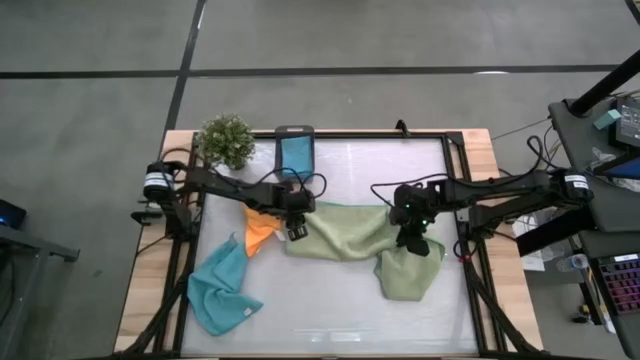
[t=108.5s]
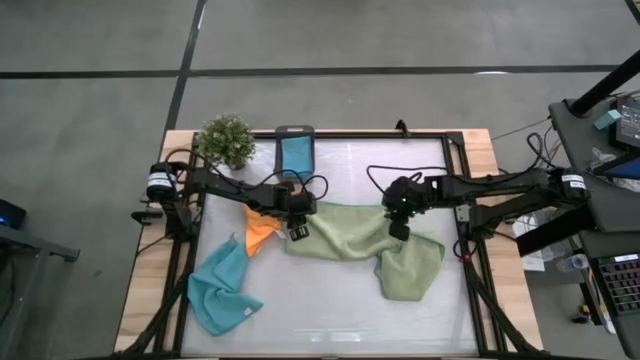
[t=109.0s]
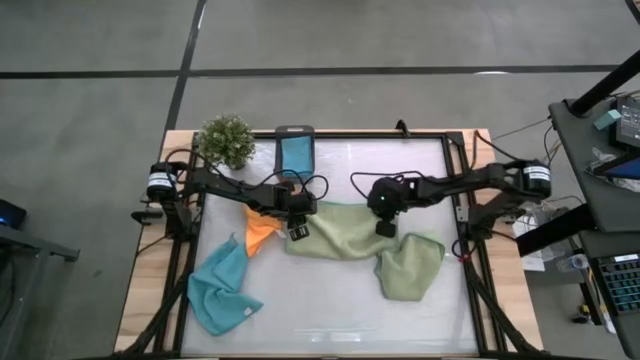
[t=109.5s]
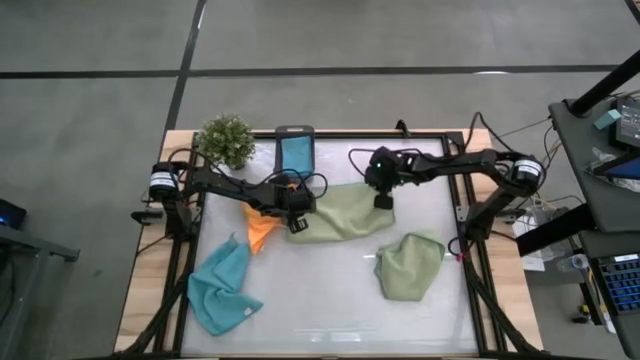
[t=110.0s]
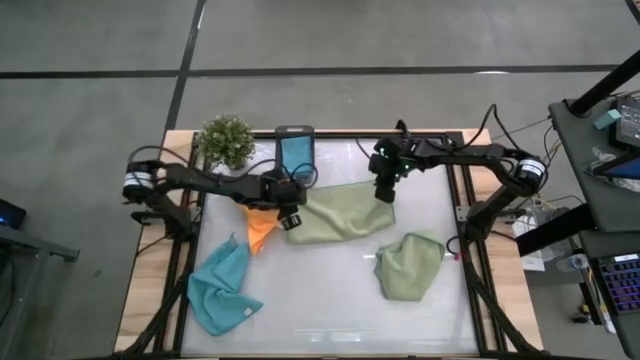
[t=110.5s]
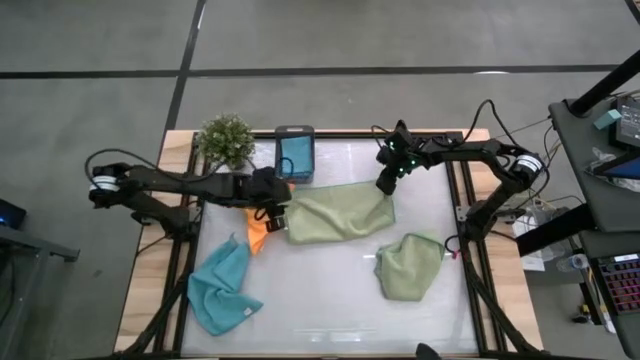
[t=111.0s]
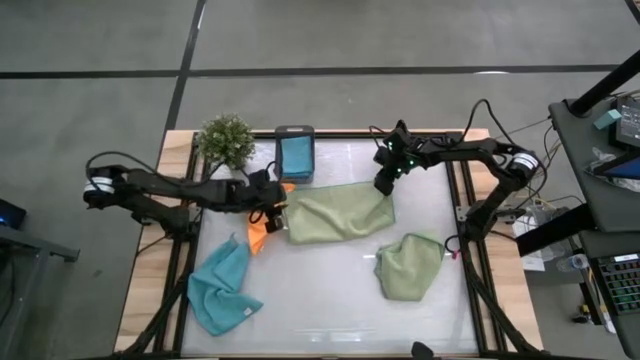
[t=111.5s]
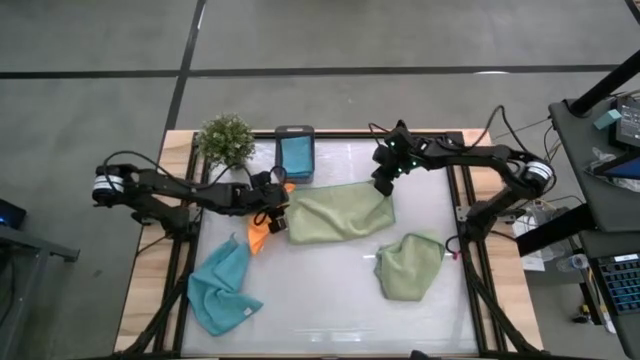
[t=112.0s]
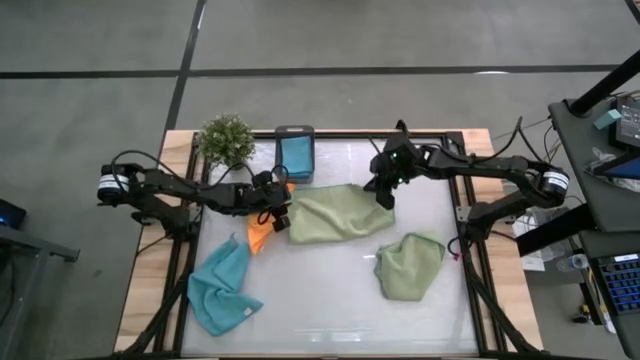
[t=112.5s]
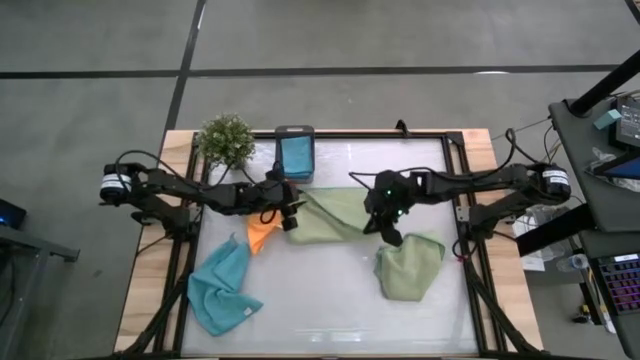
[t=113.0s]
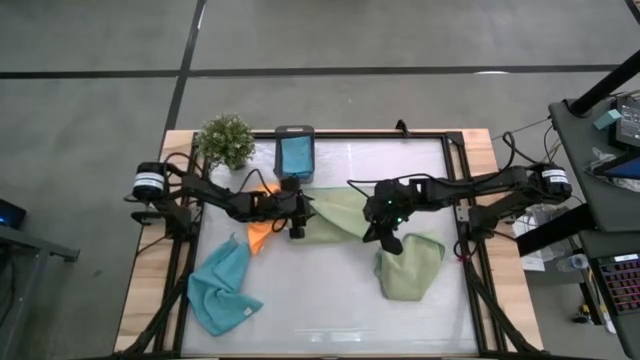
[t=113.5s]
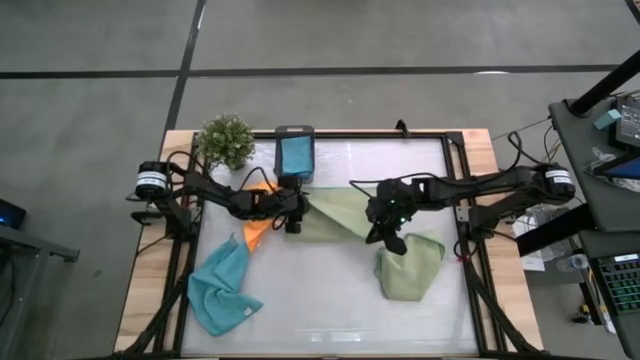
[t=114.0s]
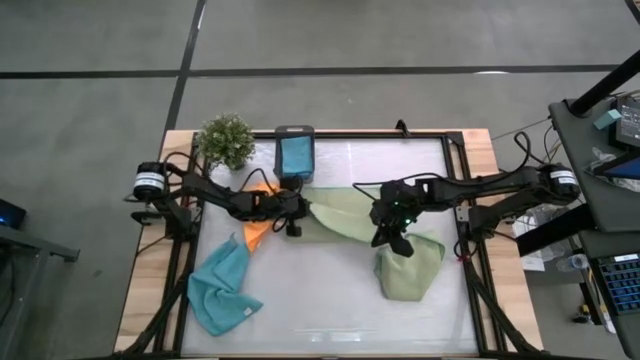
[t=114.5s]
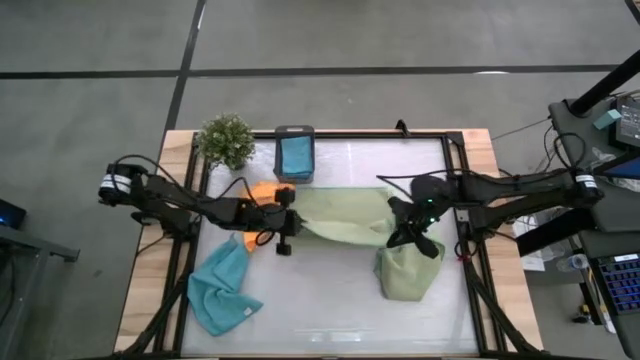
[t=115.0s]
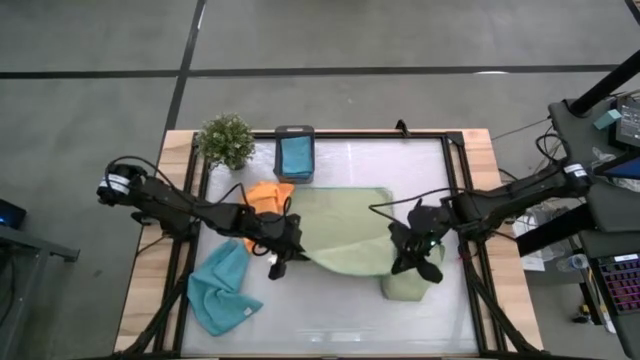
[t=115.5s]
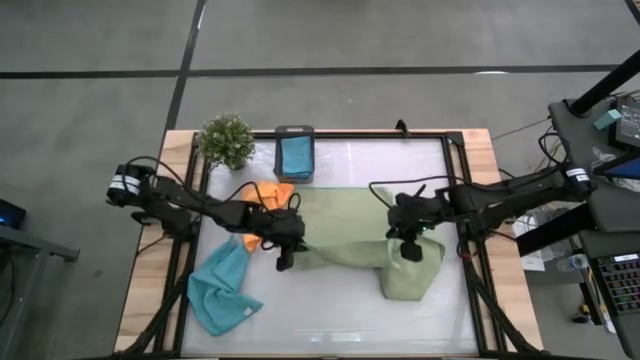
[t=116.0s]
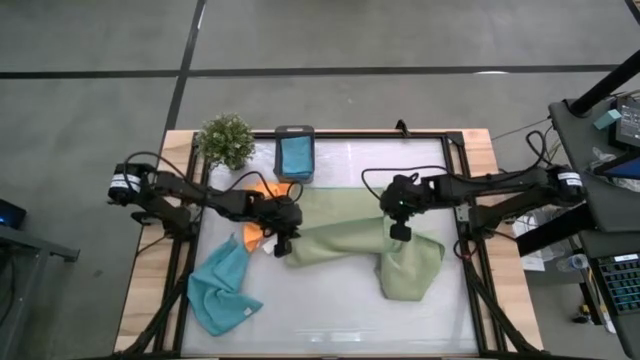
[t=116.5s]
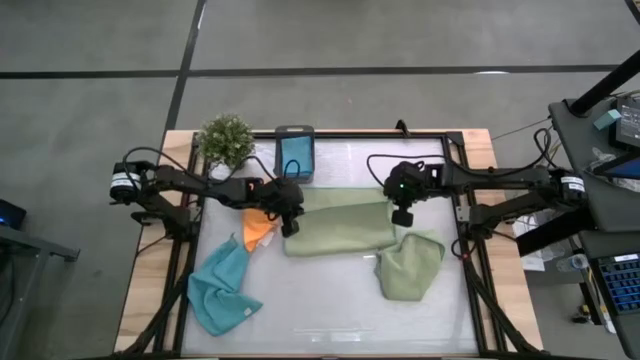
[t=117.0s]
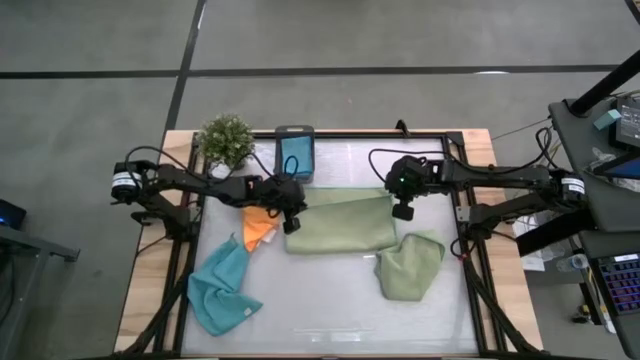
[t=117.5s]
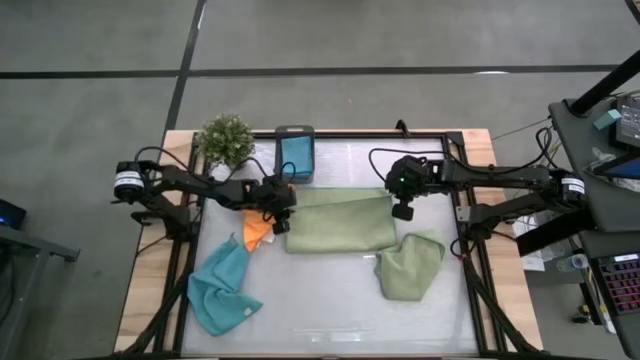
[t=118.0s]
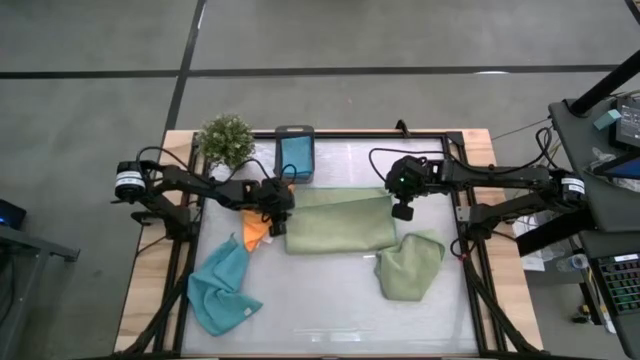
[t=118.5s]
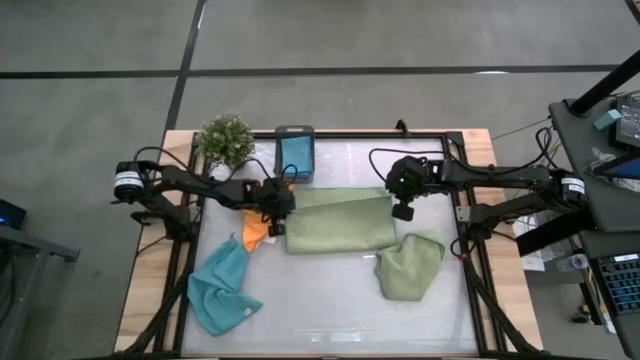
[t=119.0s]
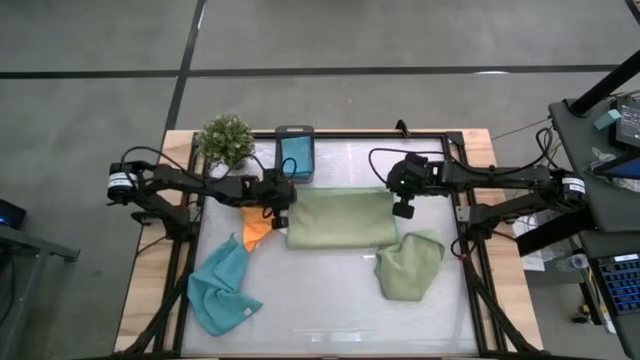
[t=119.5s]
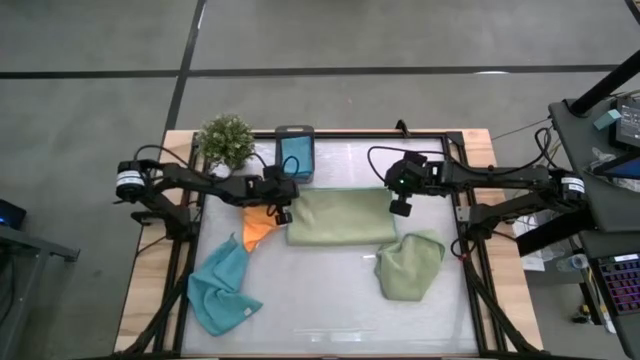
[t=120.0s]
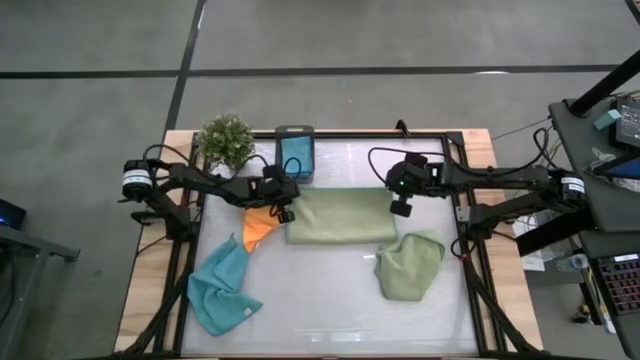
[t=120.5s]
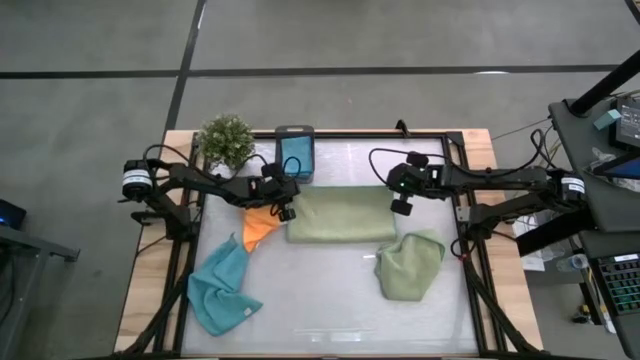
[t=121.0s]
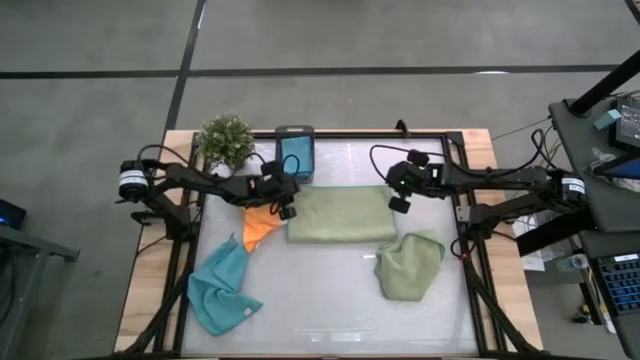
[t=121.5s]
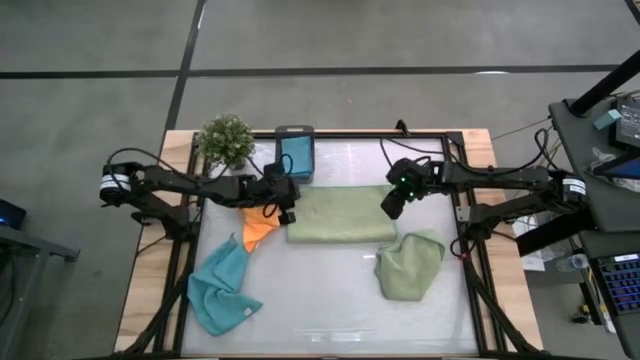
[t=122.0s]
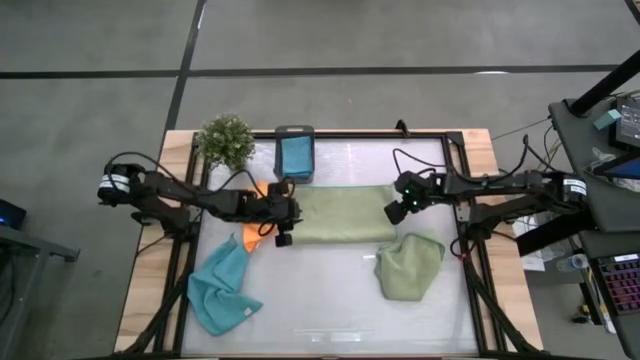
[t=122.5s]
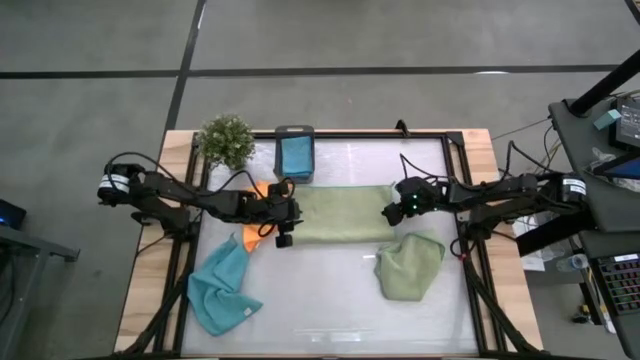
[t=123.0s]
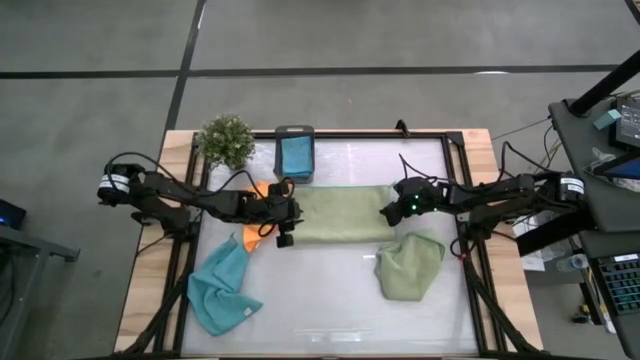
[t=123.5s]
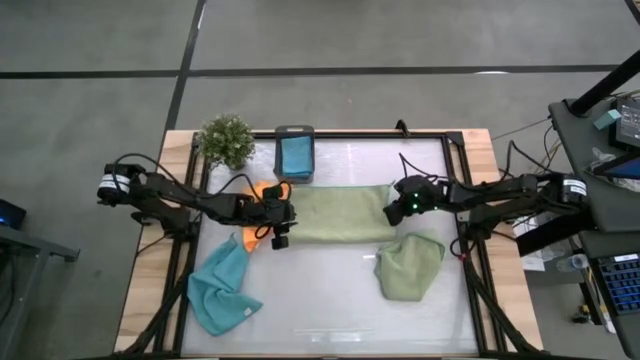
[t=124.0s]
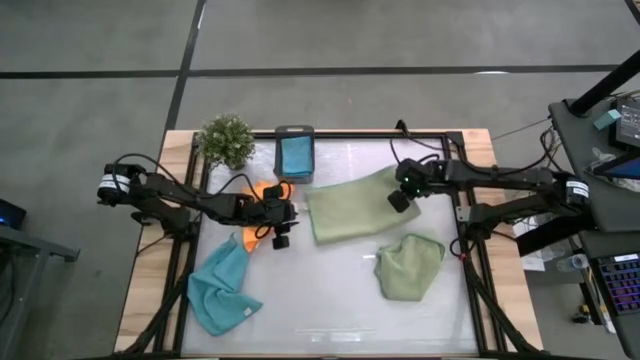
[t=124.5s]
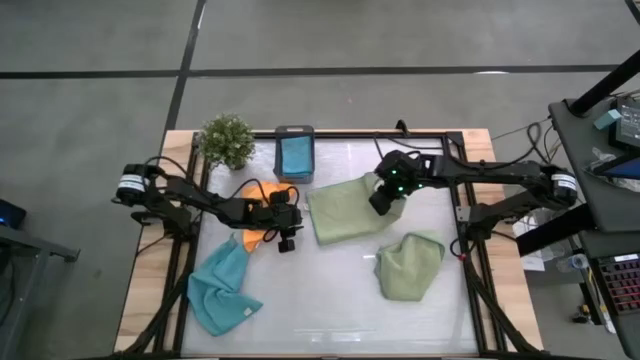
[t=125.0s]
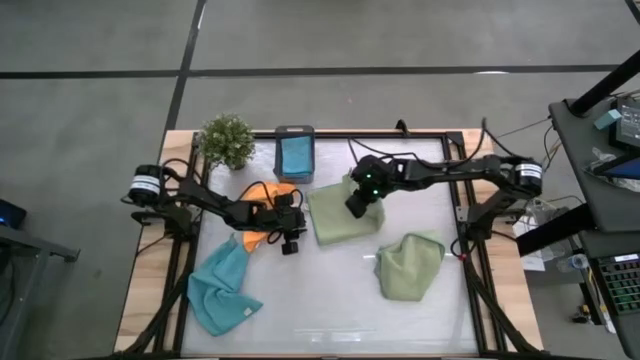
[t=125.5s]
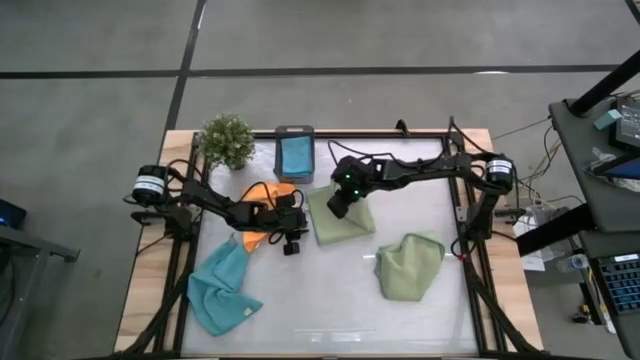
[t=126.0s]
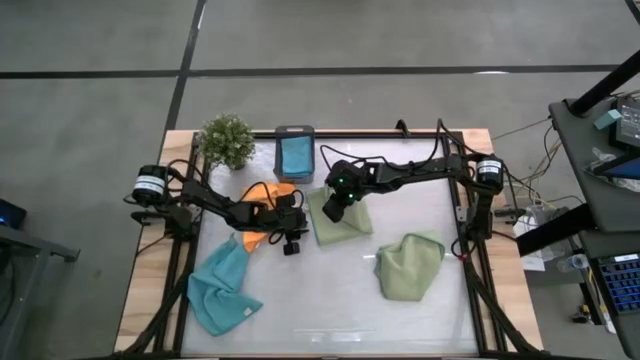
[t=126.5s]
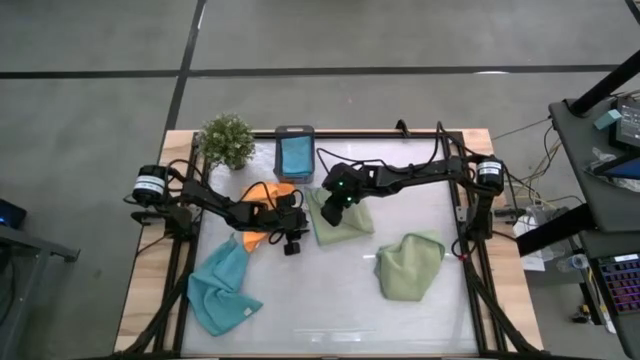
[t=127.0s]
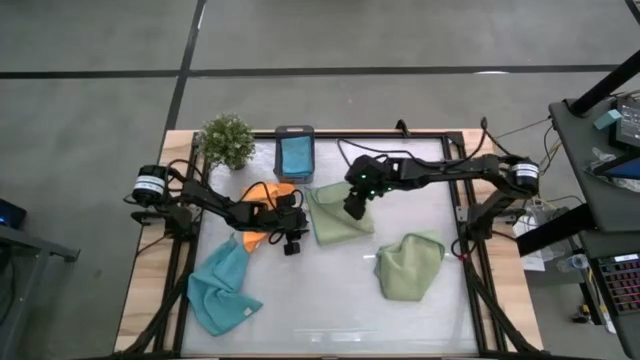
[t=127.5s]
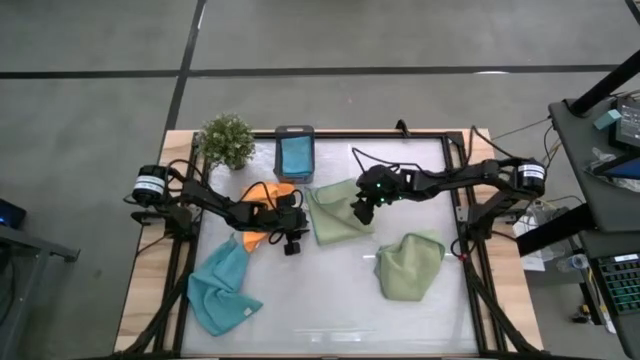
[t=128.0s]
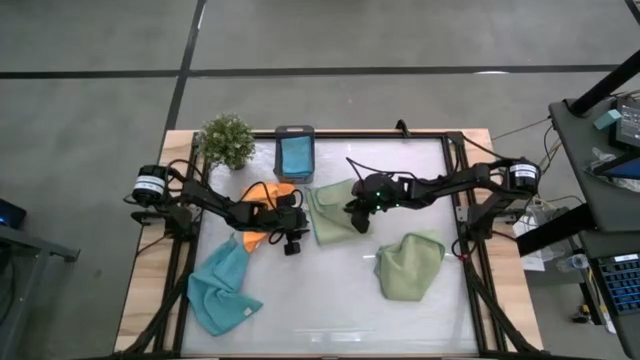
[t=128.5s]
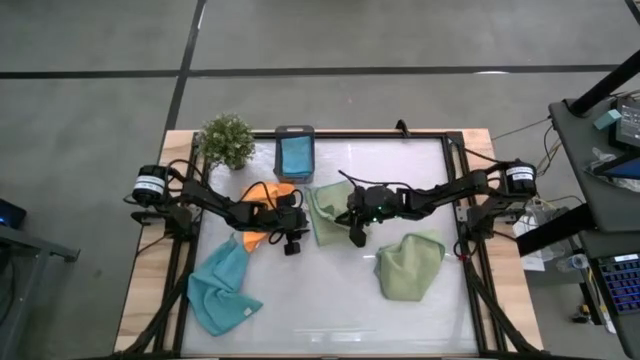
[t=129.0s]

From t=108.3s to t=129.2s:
Task: Fold microfiber towels
Fold the top green towel
